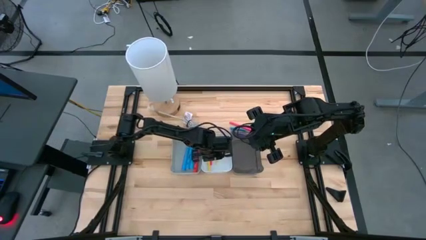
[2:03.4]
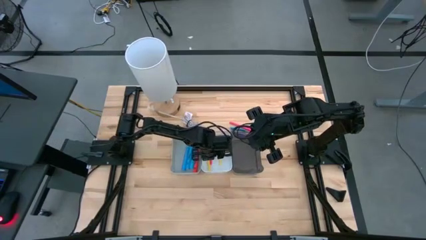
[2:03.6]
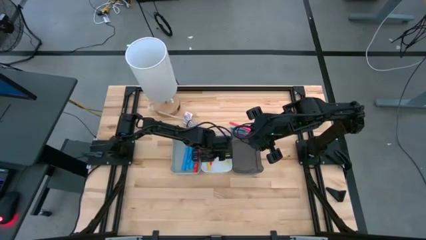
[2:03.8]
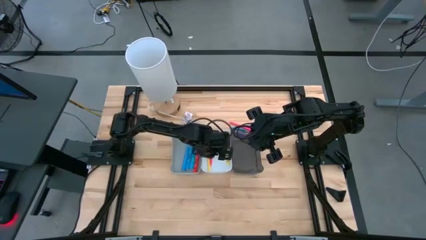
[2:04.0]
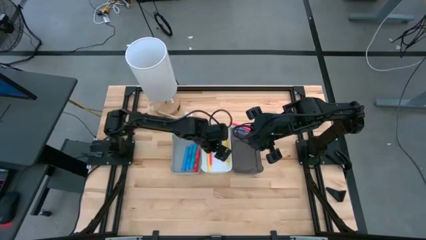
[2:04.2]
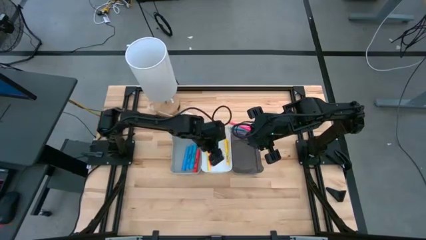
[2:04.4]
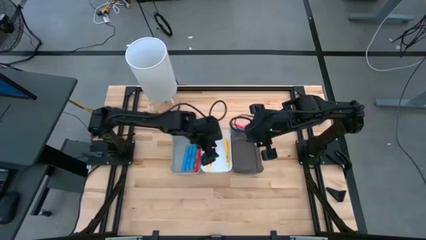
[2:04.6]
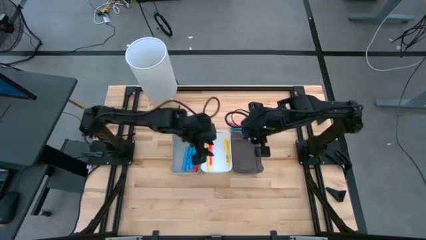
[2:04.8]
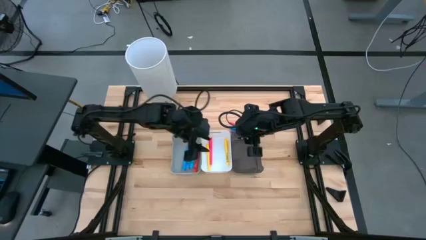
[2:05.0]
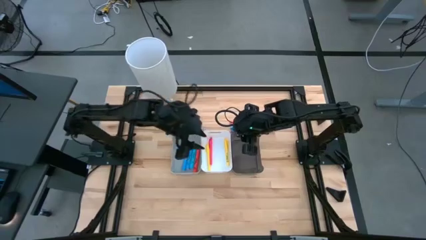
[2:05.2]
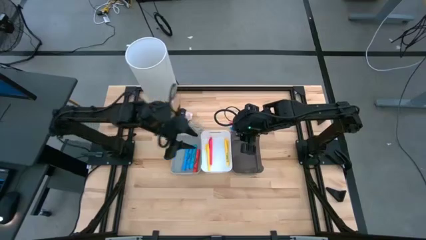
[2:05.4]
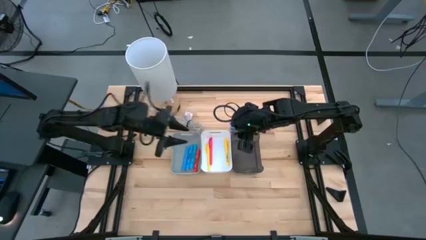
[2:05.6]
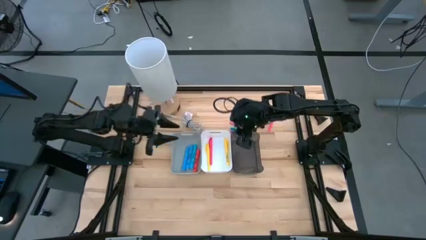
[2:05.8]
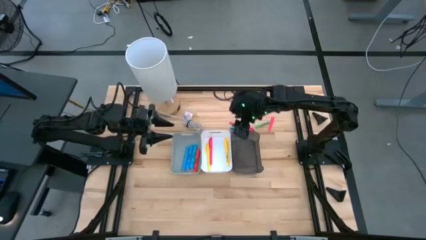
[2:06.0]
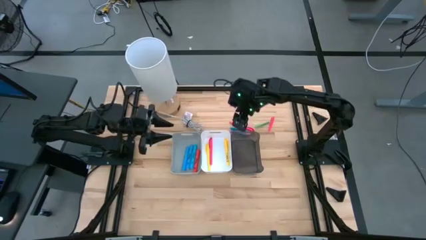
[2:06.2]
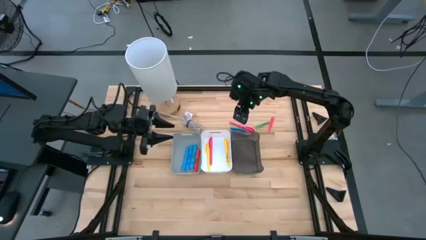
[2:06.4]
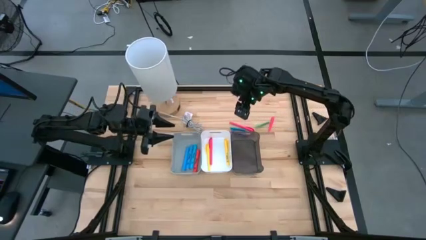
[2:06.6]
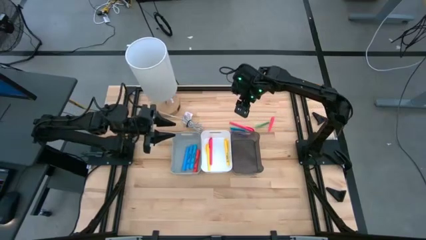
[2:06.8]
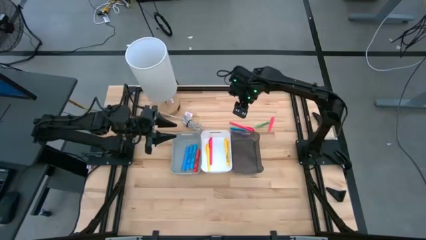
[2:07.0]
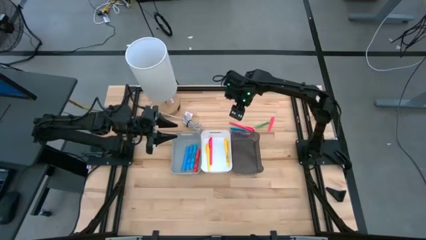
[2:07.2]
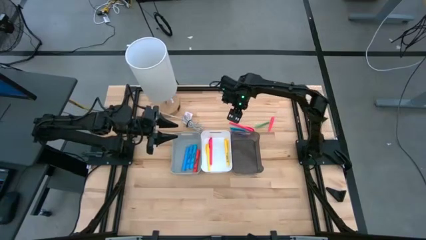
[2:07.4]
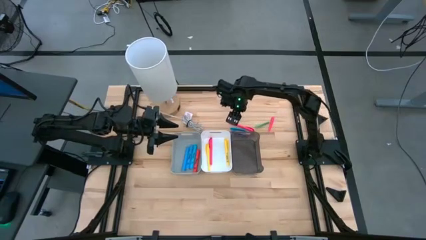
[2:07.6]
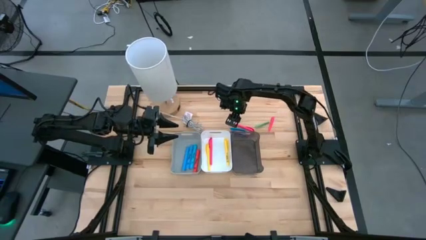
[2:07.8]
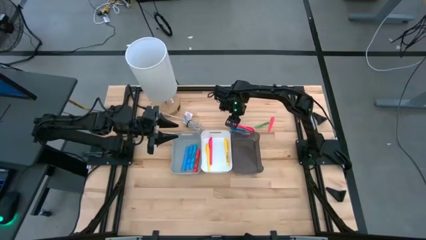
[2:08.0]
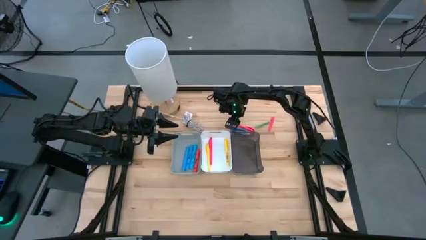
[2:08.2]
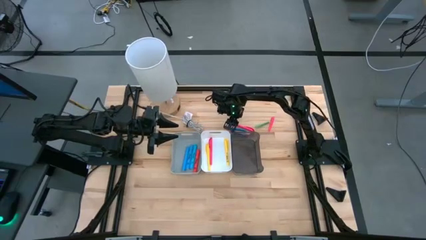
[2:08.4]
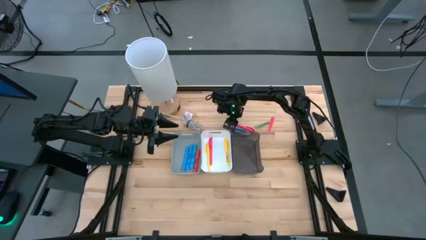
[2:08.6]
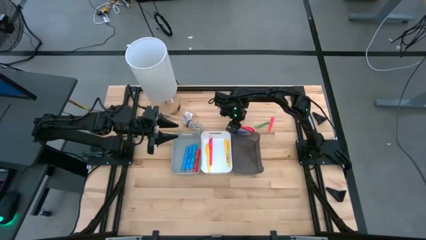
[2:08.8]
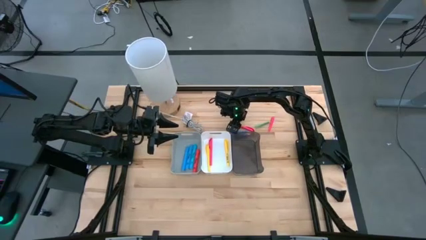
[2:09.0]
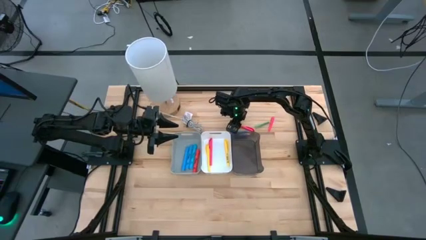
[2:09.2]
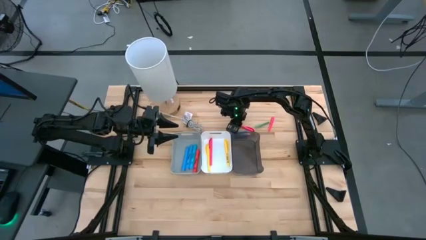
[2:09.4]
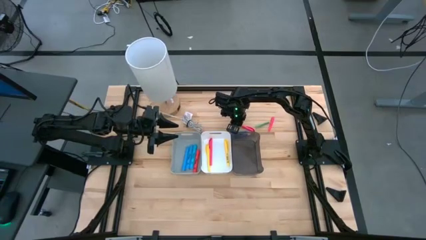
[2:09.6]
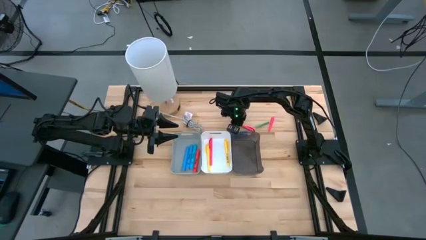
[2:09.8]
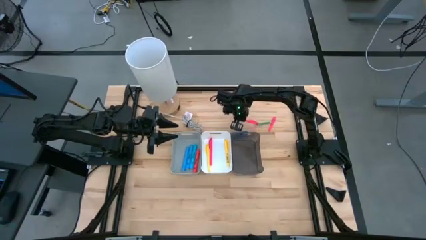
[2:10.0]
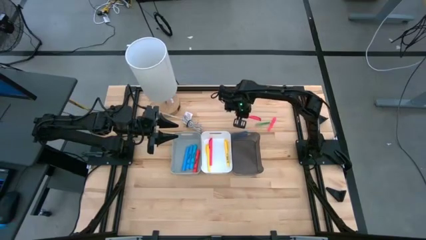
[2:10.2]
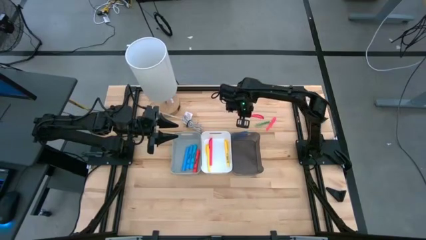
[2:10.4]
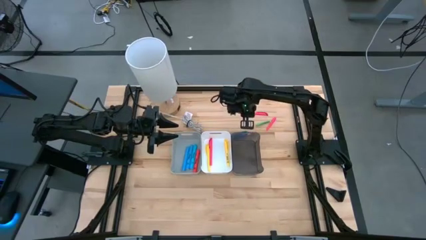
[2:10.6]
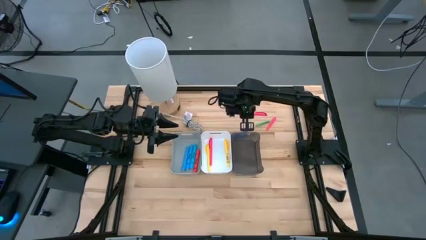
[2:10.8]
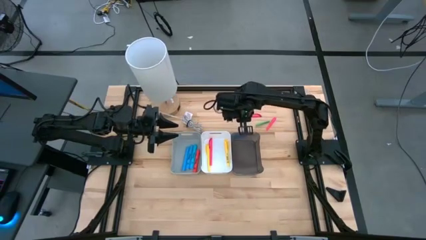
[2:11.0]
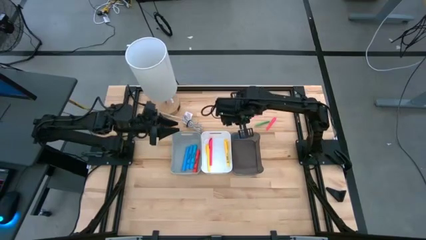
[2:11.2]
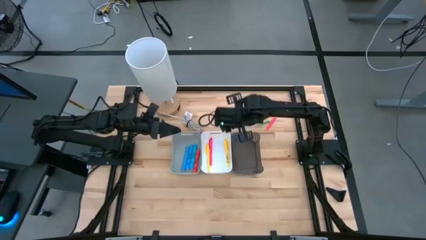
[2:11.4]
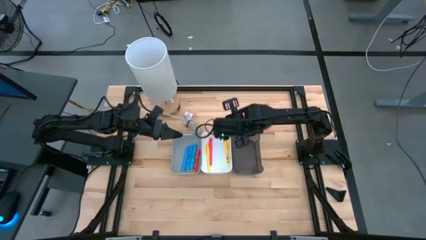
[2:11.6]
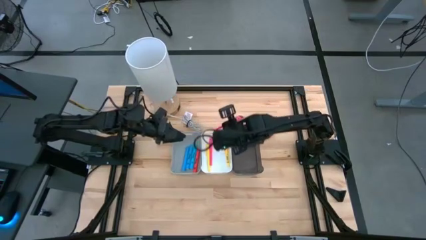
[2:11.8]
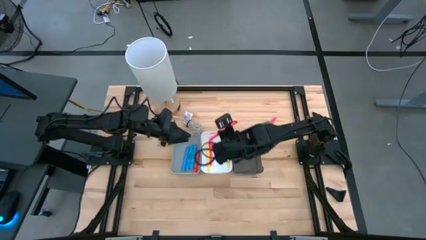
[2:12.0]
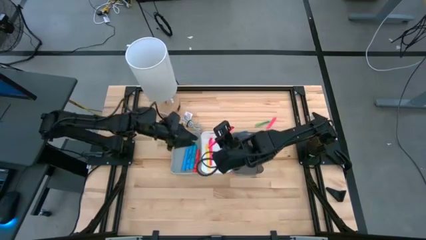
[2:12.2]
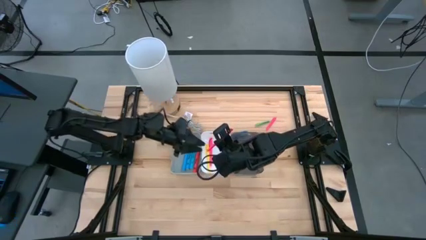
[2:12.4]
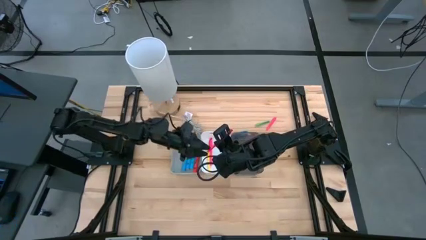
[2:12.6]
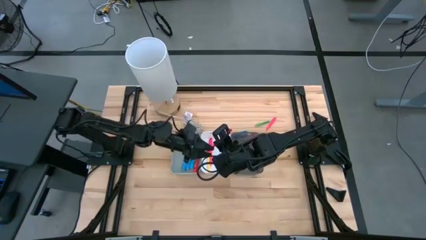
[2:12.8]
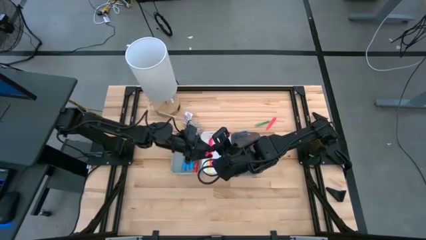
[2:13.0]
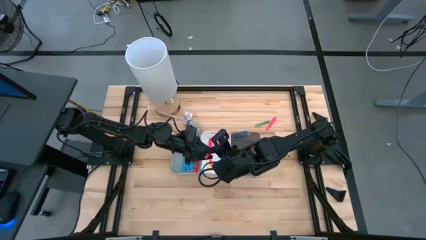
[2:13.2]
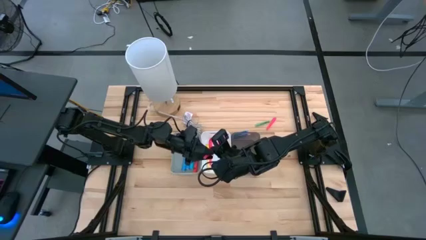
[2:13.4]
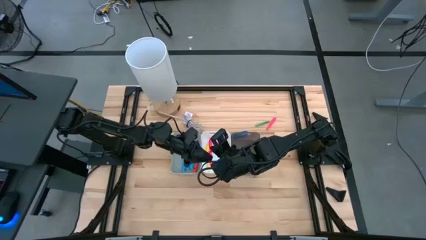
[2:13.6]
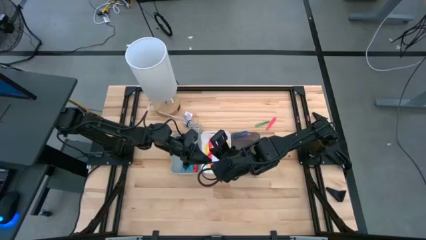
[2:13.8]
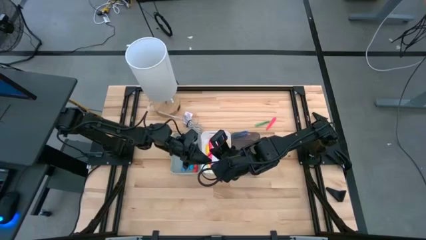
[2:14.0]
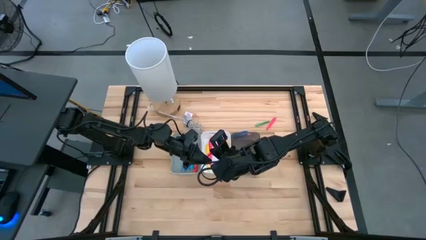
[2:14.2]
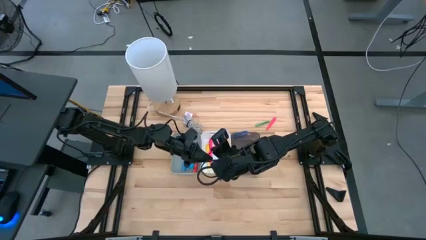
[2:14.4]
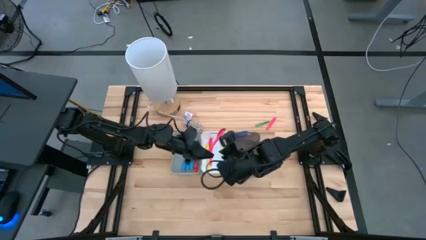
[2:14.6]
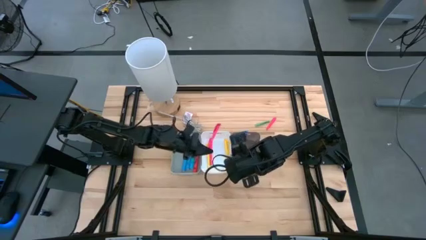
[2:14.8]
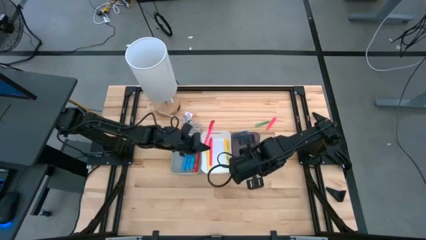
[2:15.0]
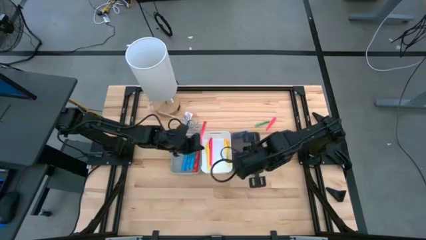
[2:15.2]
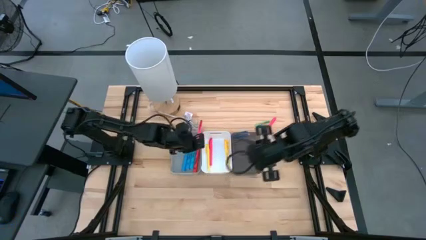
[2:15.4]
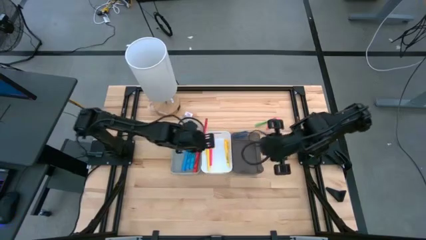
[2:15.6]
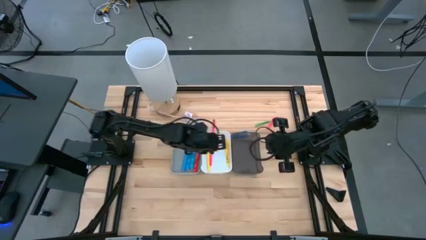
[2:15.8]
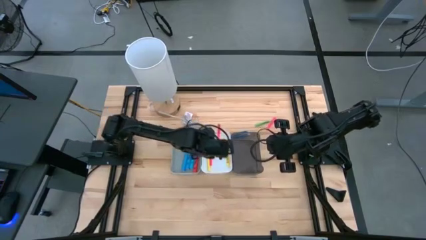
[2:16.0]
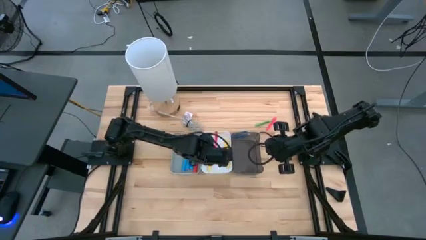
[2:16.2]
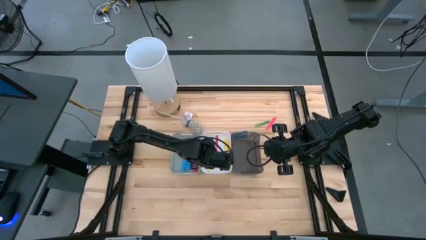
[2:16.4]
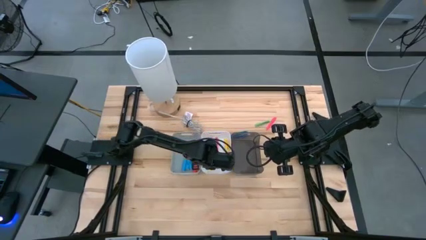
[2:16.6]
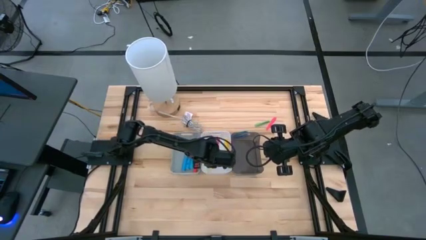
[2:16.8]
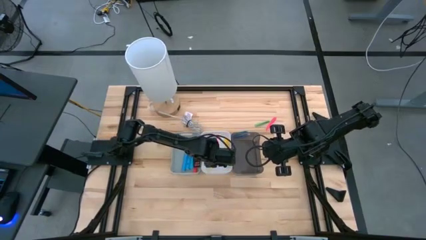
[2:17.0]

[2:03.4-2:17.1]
Task: Pick & Place Markers
Put the big pink pen into the white bin

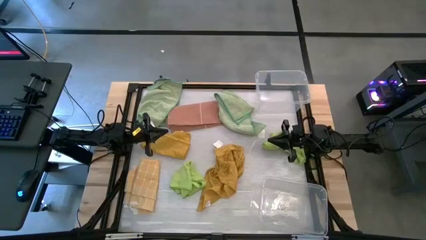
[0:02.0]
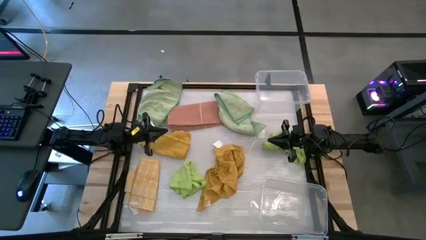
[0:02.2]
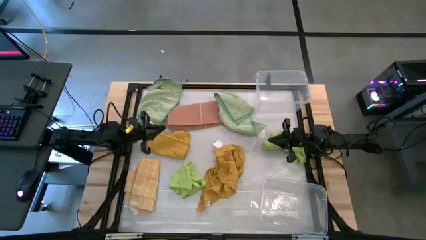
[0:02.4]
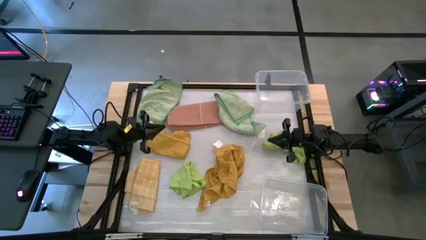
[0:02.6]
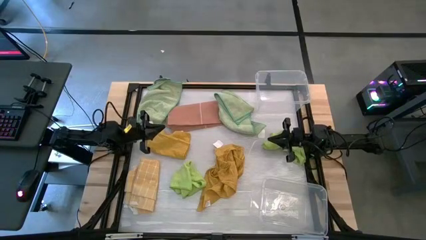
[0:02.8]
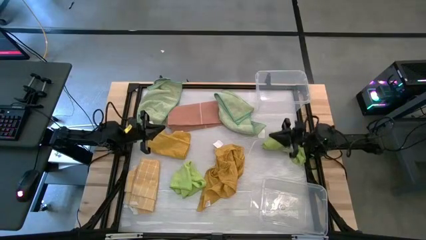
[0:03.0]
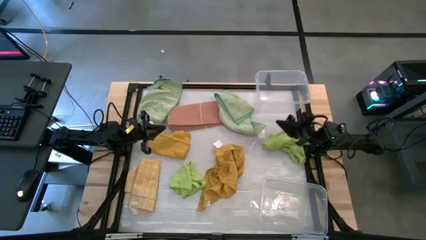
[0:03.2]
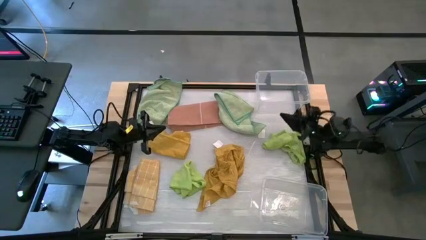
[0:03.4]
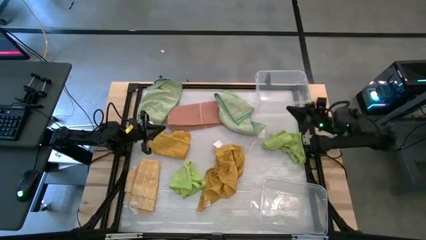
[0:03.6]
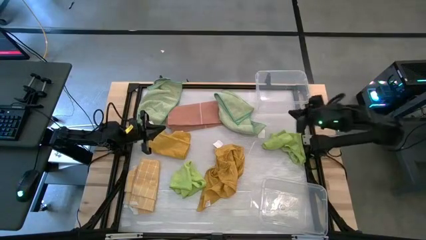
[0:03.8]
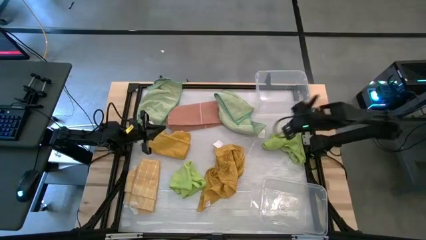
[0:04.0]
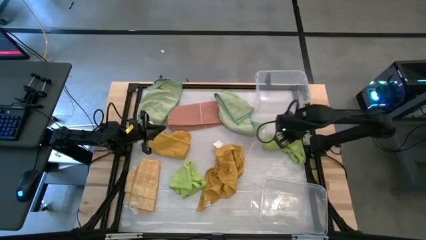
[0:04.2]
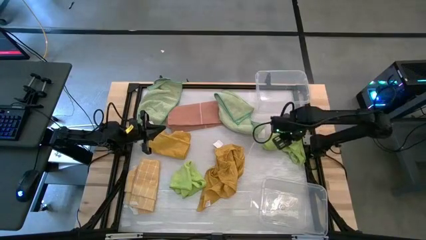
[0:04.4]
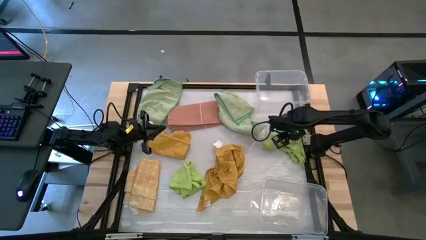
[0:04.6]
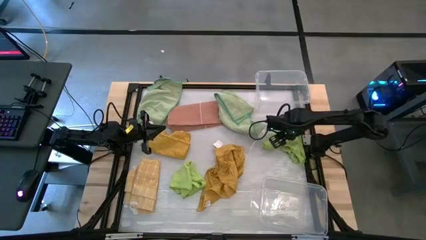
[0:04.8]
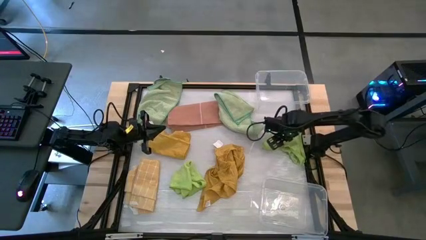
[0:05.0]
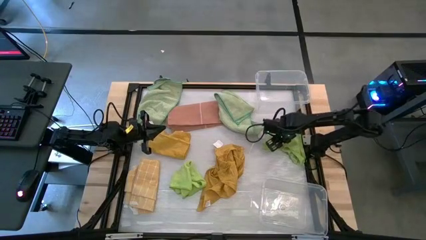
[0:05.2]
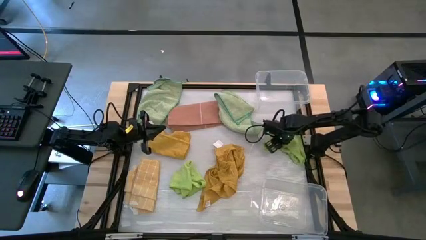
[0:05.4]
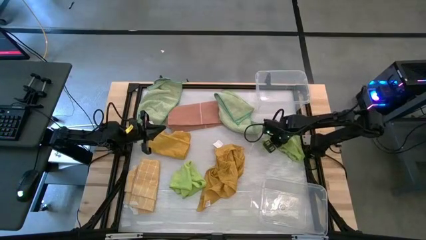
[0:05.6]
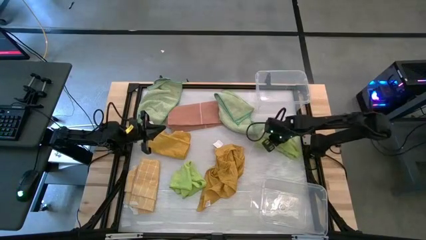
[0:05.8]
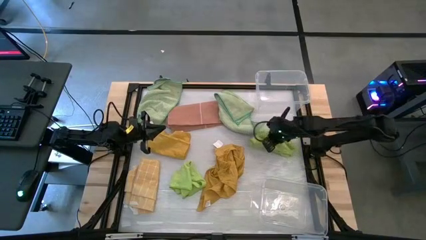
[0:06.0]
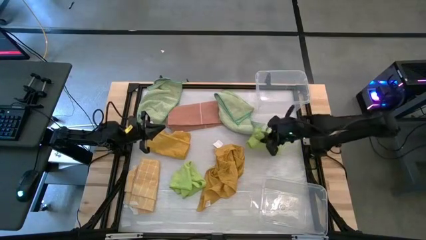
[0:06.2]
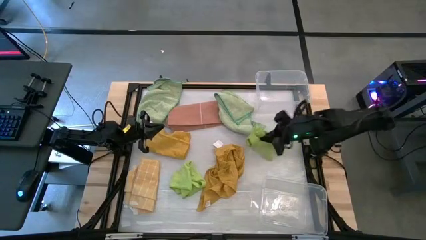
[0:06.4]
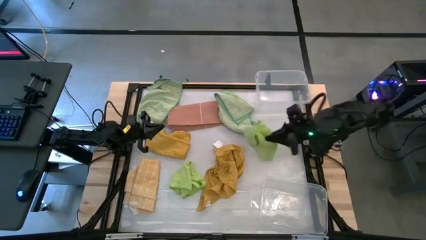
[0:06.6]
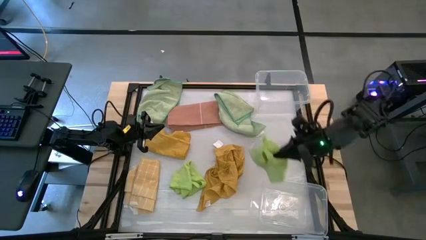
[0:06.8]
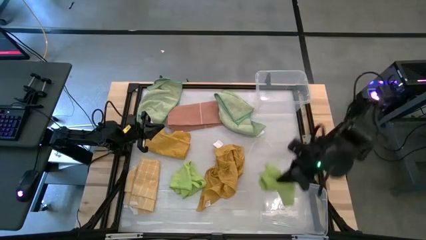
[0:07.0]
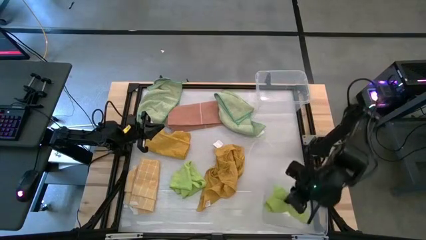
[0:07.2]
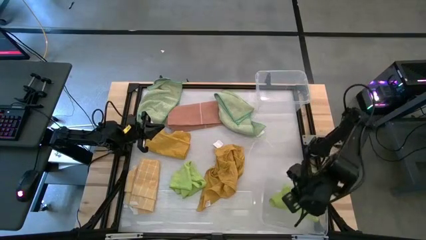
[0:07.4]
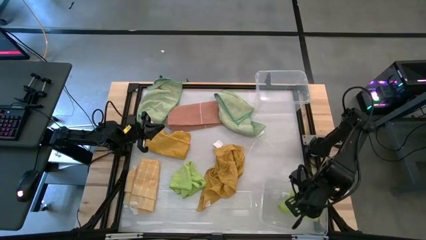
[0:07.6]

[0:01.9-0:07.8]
Task: Sort microfiber towel by color & place in baskets
Put the green microfiber towel into the bottom transparent bin
